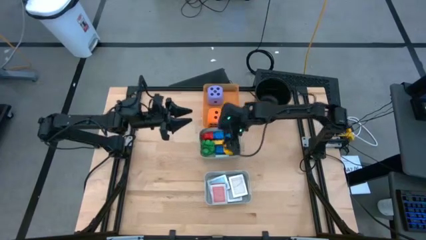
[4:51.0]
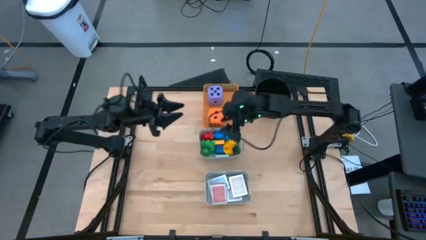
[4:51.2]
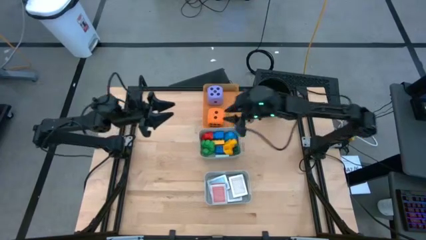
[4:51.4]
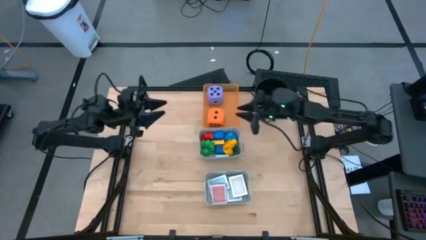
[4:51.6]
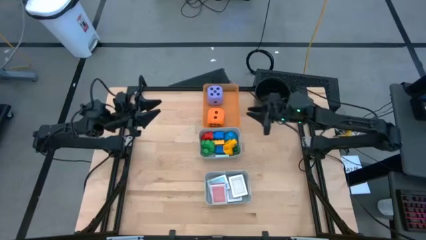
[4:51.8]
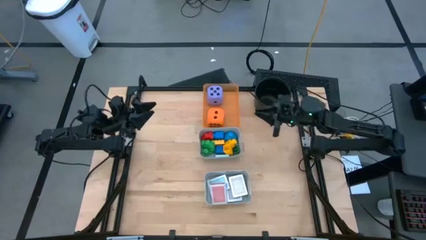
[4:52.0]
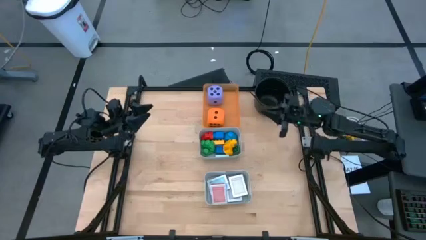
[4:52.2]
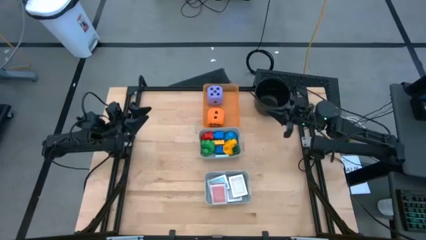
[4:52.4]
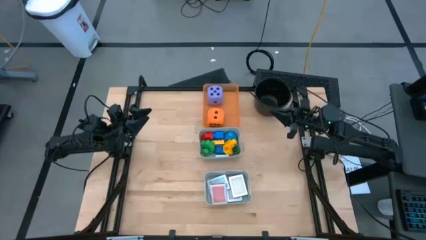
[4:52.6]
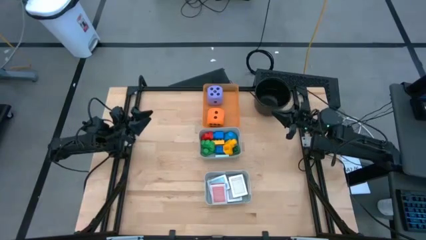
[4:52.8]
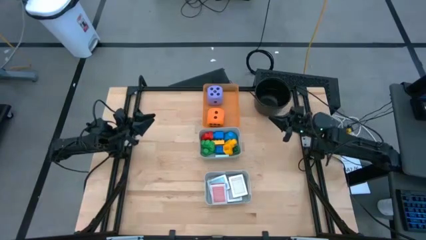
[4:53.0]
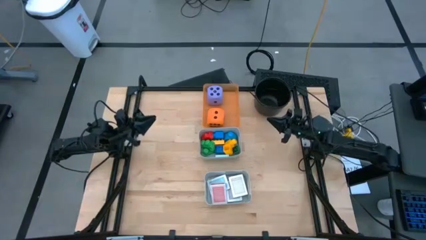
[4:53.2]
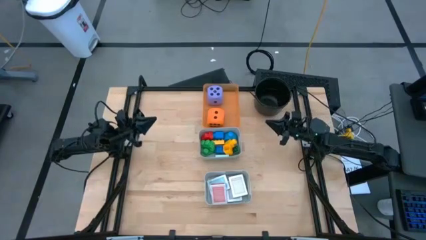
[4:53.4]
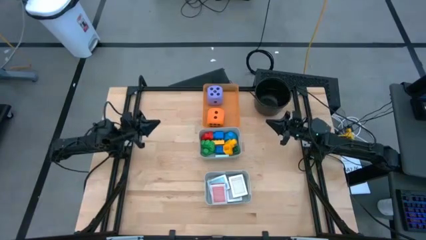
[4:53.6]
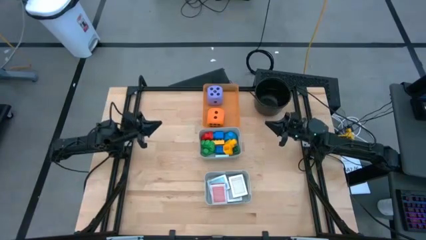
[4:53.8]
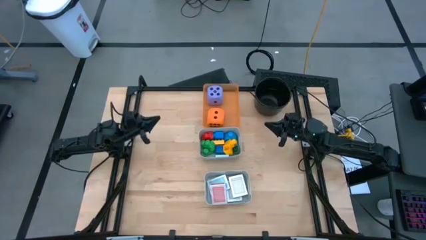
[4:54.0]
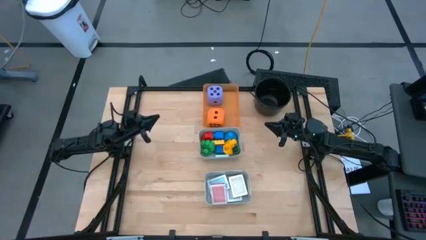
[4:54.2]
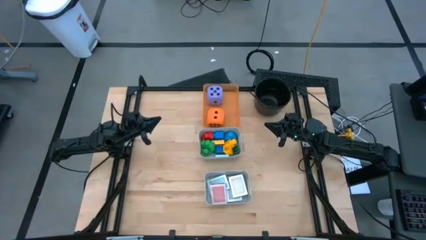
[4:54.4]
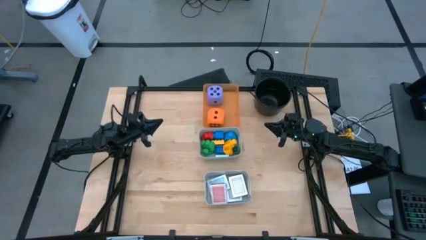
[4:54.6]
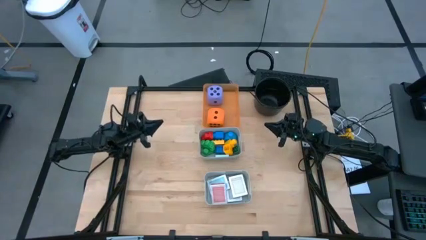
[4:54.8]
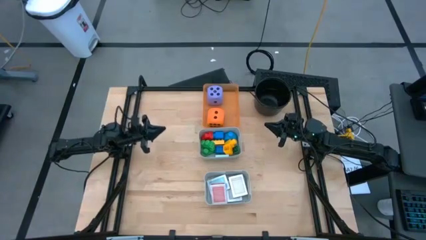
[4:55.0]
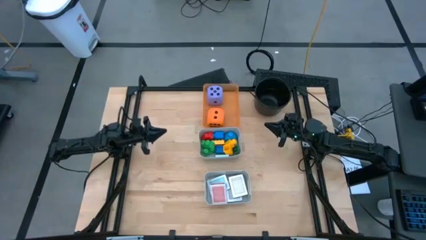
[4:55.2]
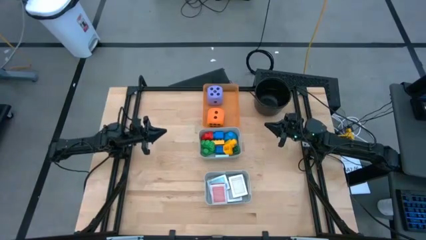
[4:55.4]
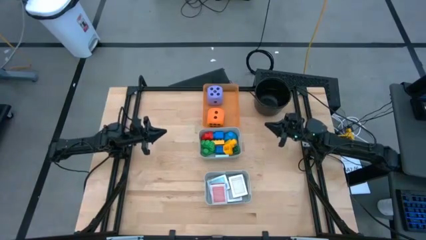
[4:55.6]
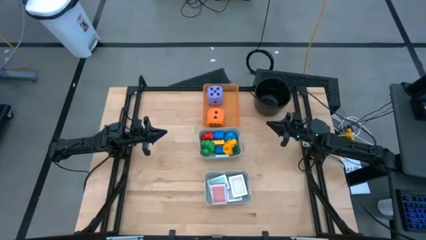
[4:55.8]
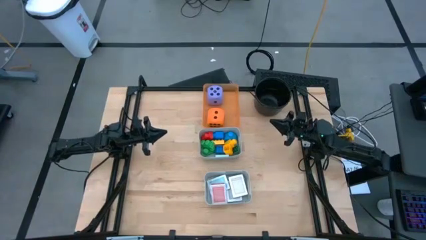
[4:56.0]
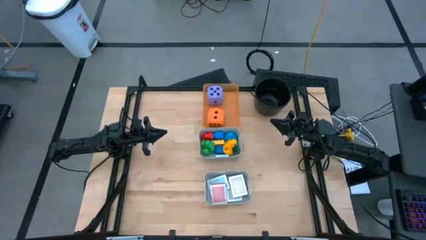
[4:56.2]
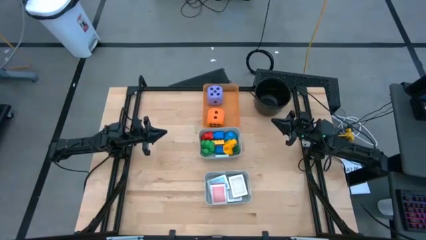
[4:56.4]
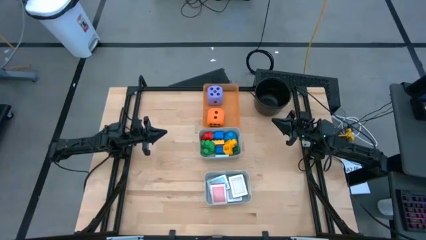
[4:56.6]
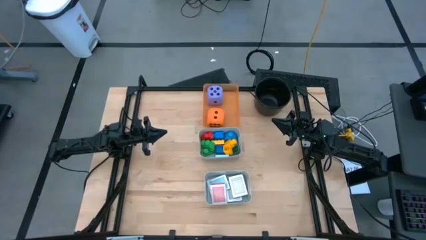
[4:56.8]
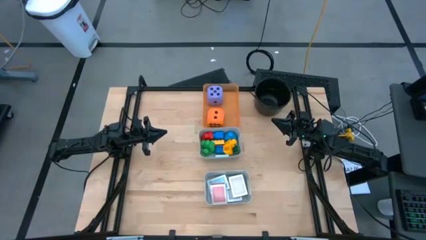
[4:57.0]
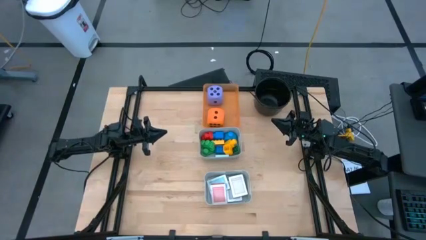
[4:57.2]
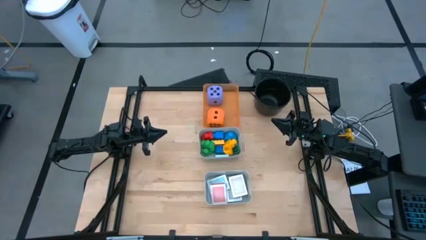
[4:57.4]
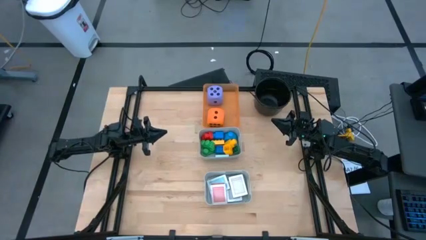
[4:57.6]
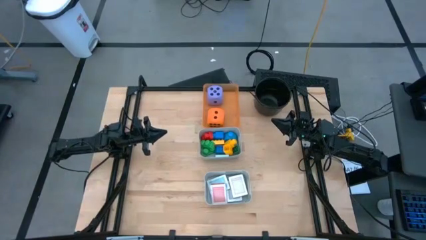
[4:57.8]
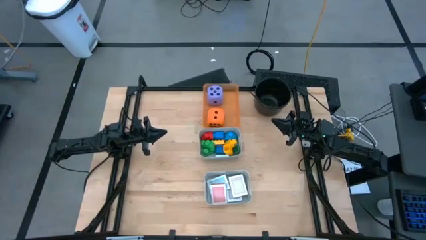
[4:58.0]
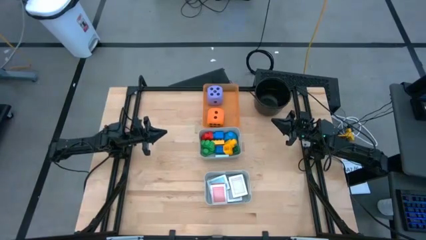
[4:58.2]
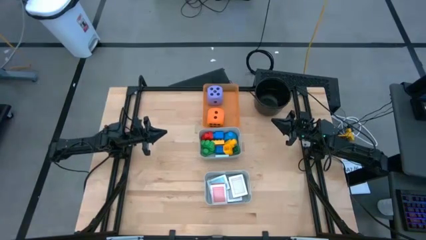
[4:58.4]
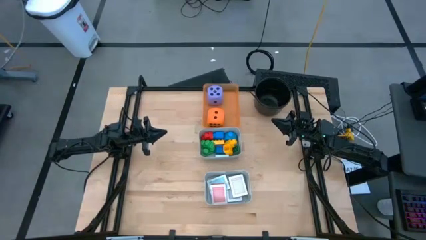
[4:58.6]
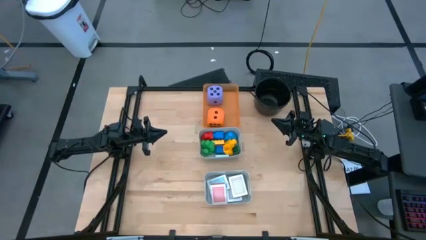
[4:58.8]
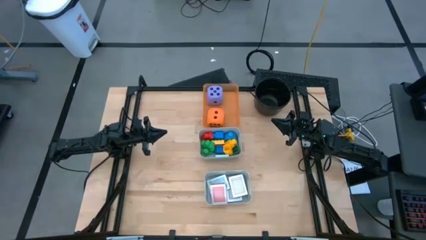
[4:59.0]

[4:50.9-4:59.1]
Task: Pick & Place Toys
Return to Home Position

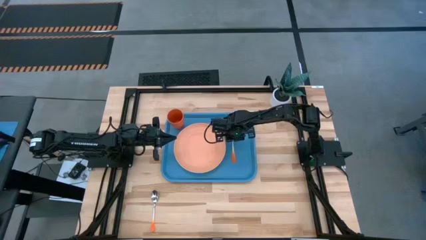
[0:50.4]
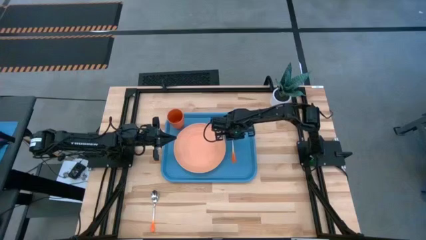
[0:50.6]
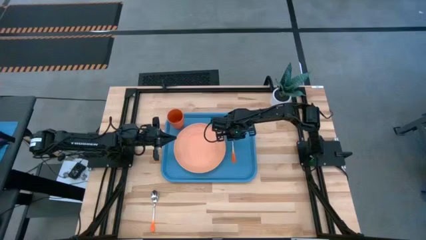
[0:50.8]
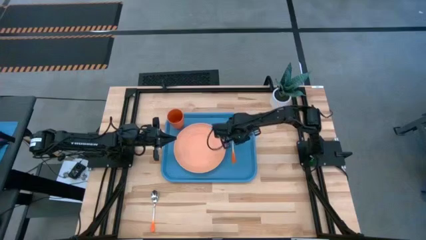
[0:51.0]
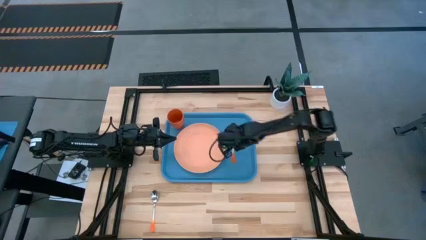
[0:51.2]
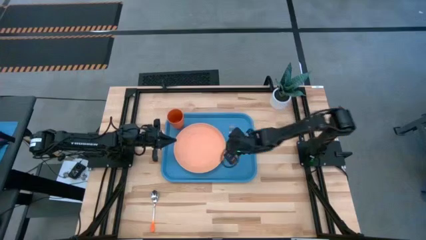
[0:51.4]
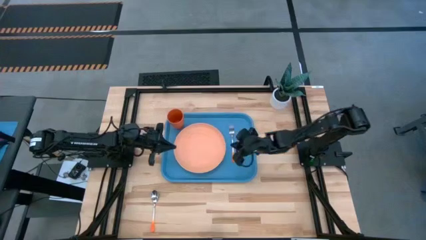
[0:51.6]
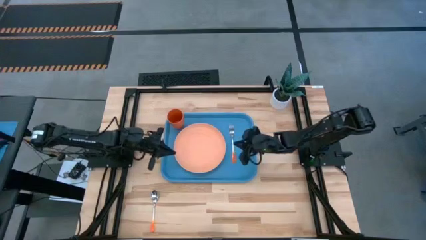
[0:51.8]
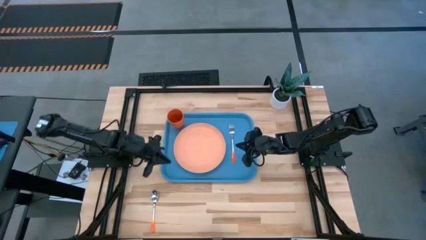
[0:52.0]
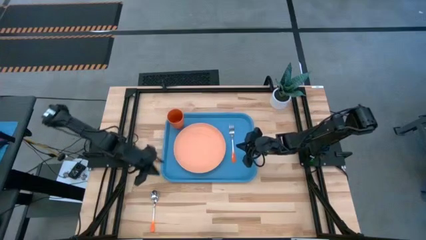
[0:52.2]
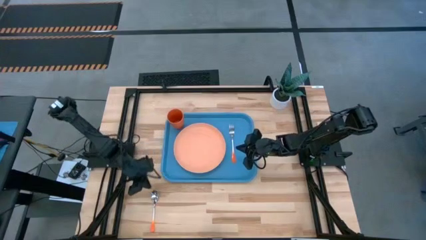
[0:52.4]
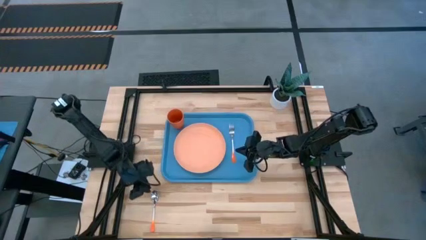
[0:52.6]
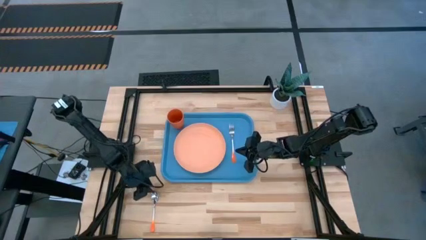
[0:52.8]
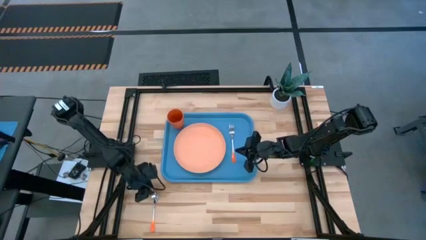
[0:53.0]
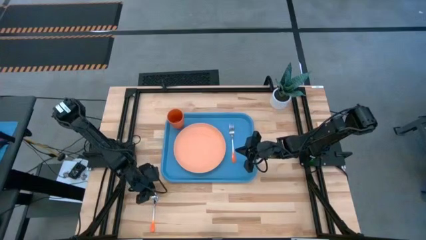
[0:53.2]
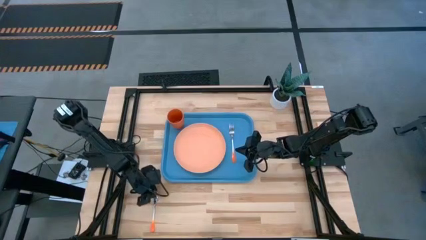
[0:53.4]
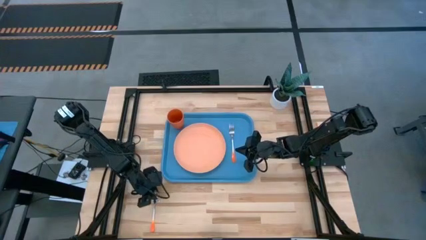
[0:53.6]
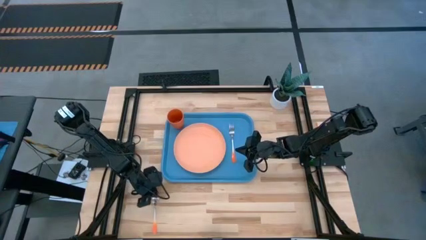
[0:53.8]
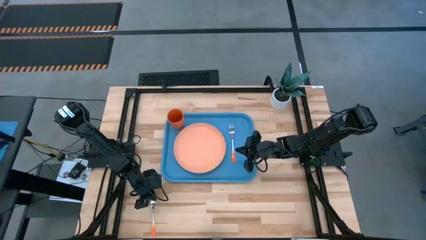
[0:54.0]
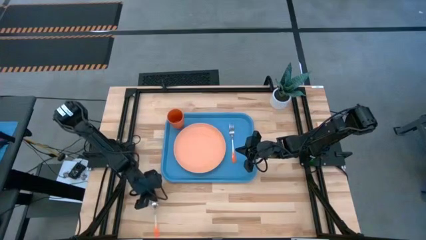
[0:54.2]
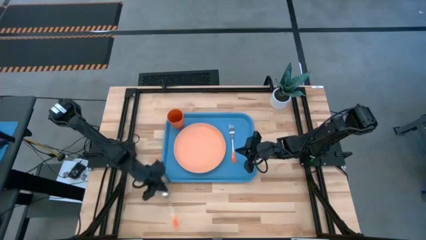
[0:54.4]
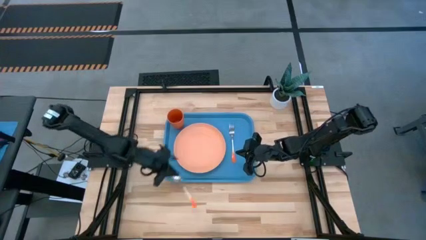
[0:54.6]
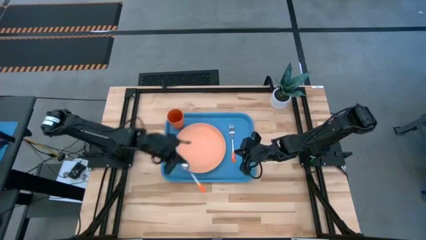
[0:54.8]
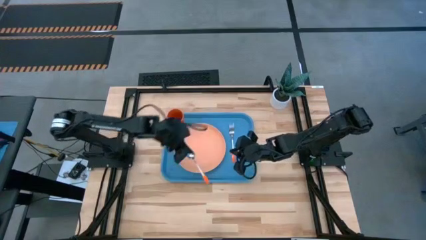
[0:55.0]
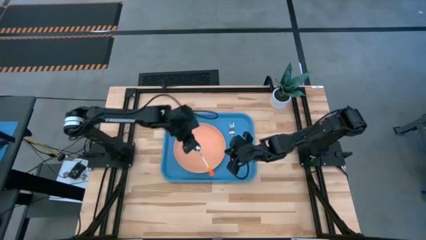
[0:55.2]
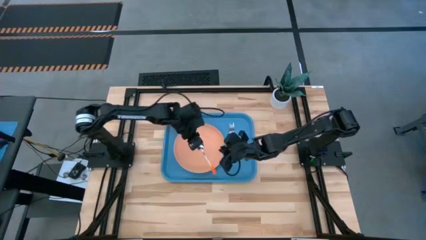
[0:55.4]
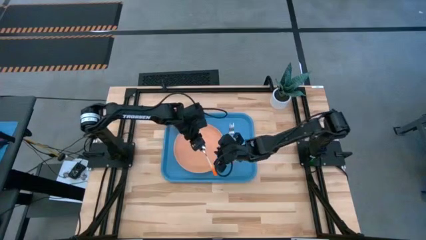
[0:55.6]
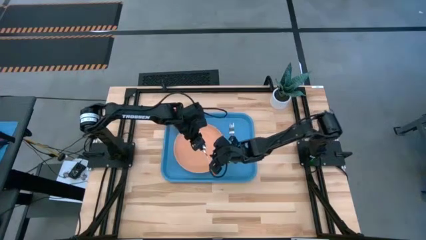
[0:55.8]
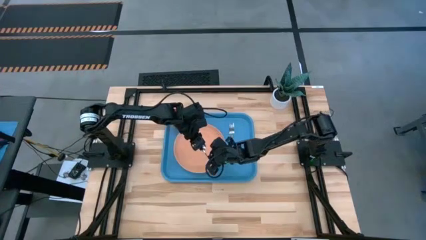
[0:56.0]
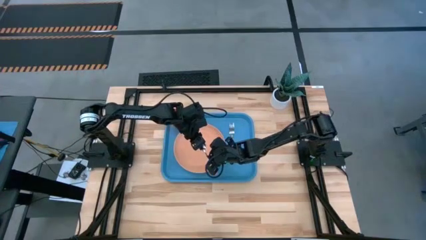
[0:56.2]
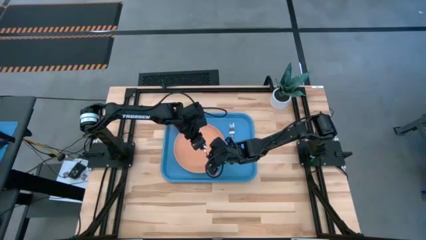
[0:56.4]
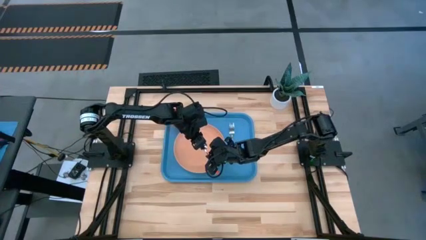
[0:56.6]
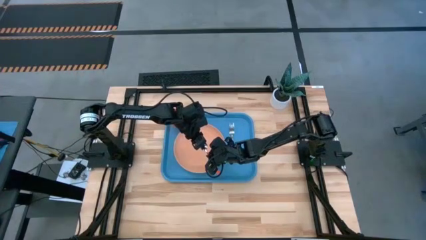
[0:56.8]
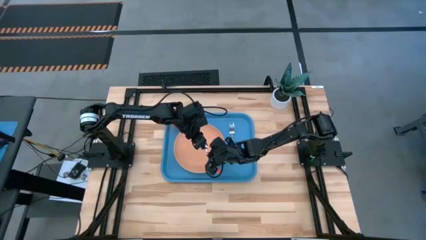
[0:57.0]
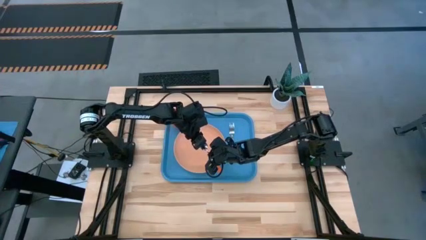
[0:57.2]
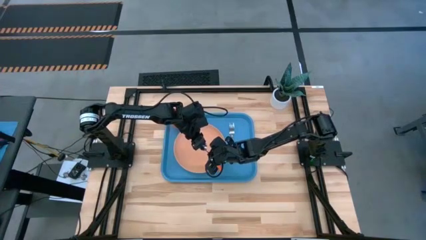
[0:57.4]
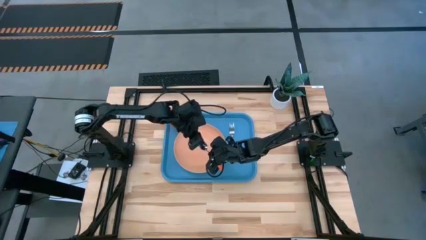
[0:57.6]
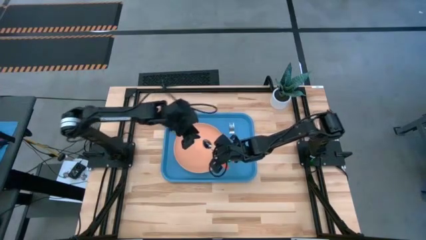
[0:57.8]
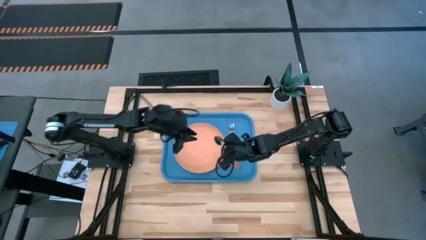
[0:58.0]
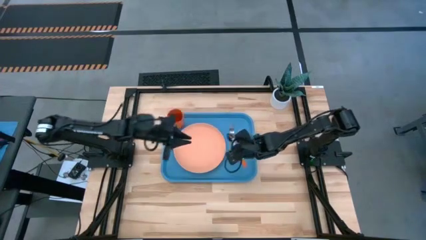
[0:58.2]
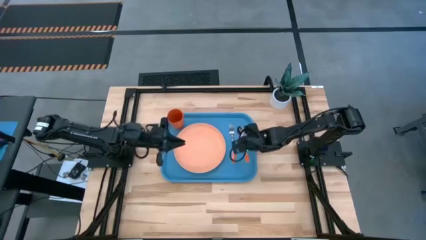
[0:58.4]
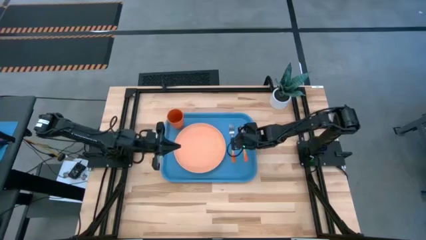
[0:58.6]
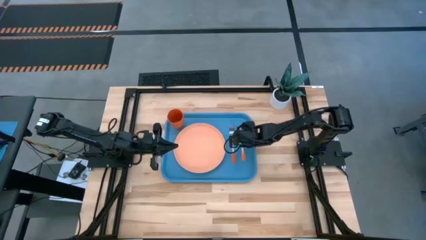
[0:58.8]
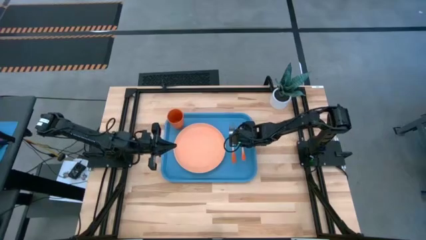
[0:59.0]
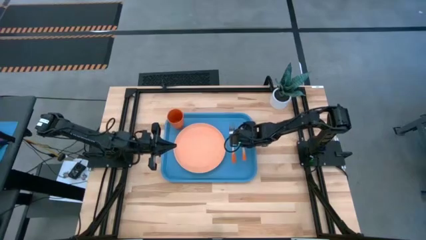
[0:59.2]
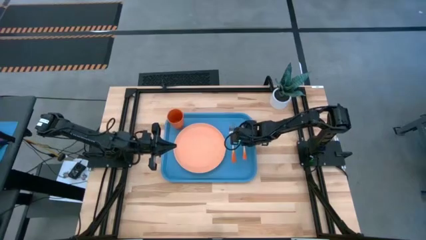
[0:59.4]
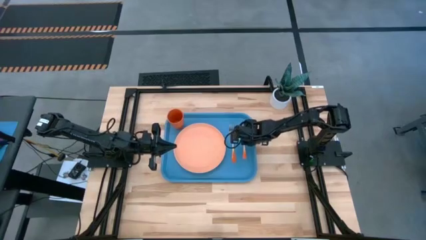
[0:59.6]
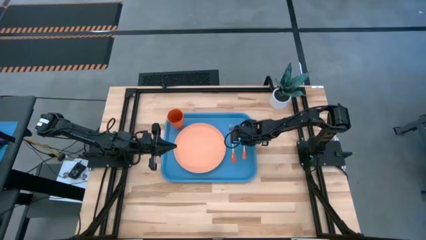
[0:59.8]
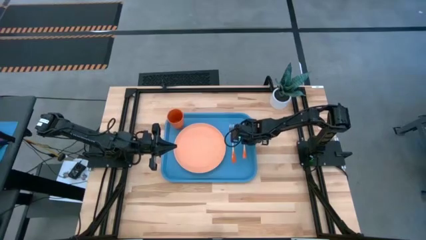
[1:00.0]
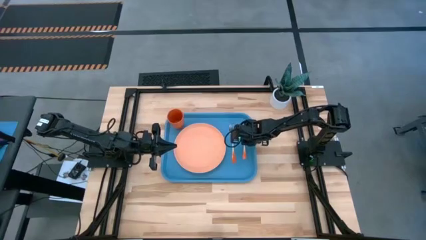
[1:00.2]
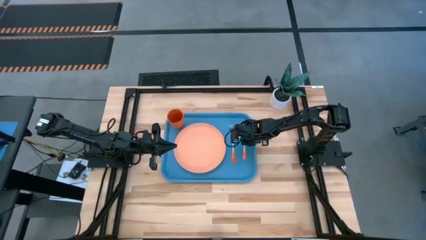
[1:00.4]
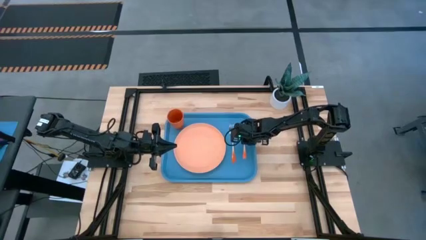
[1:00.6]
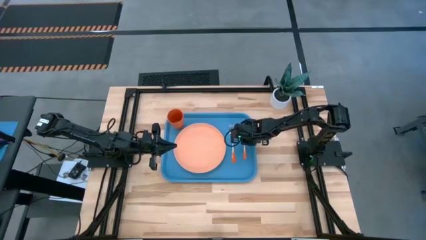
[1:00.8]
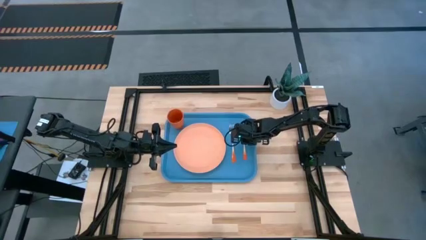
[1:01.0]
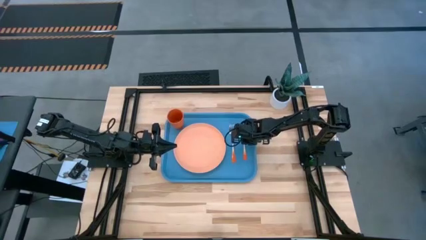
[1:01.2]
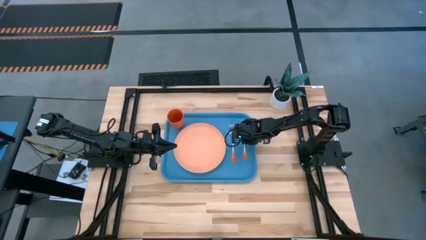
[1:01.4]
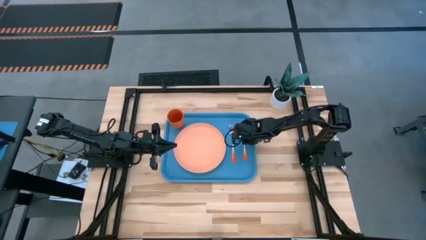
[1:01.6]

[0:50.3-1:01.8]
Task: Pick and place plate/cup/fork/spoon on tray
Put the orange spoon on the blue tray to the right of the orange fork
